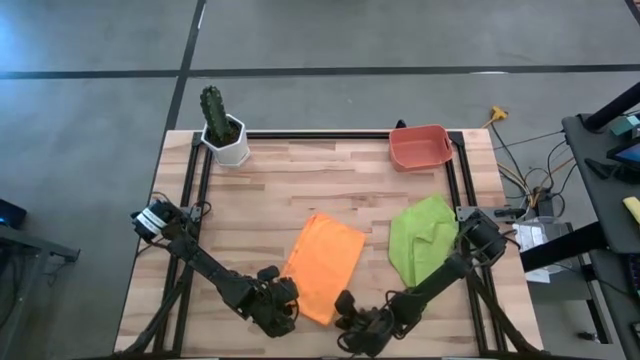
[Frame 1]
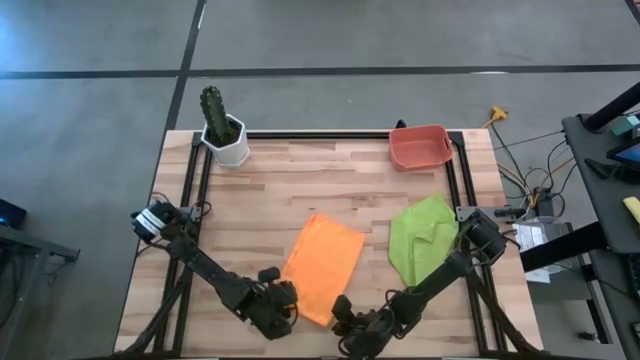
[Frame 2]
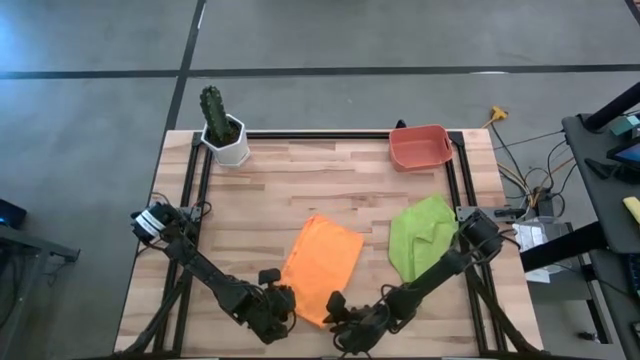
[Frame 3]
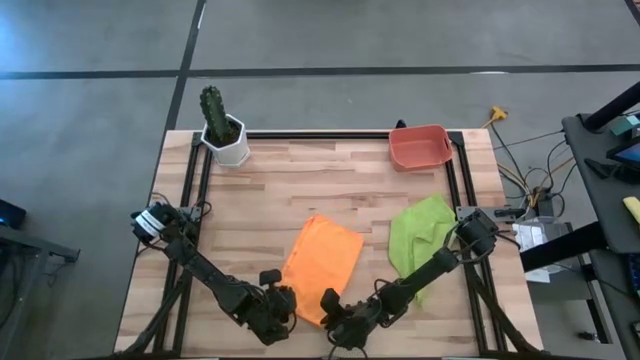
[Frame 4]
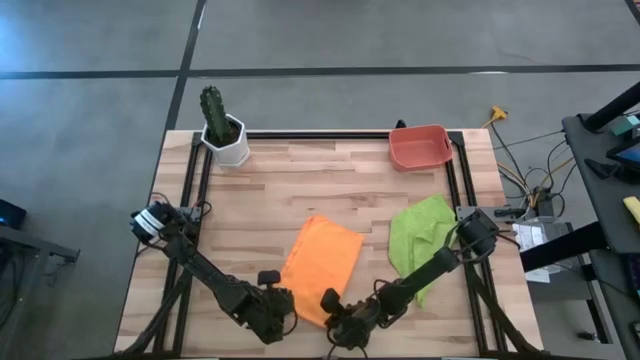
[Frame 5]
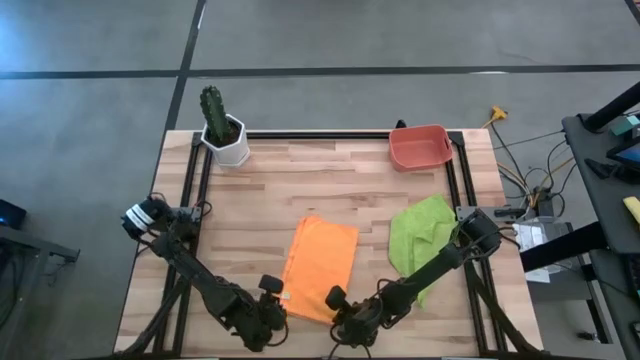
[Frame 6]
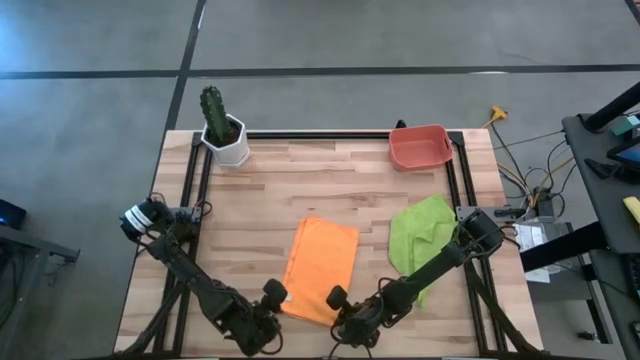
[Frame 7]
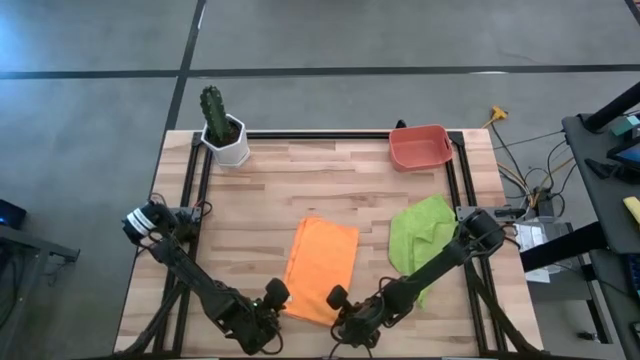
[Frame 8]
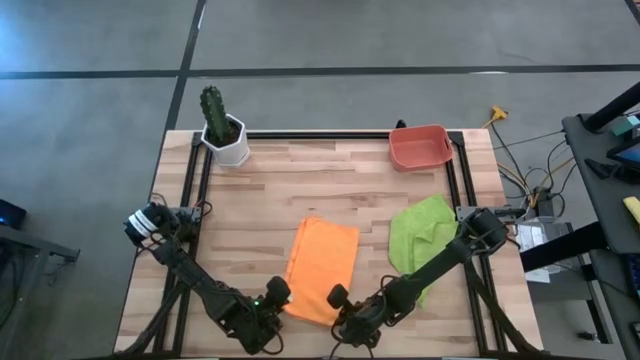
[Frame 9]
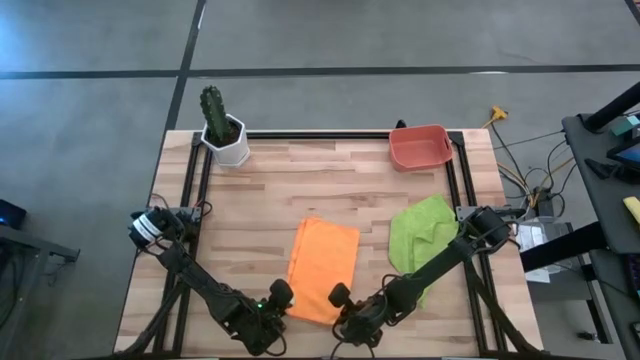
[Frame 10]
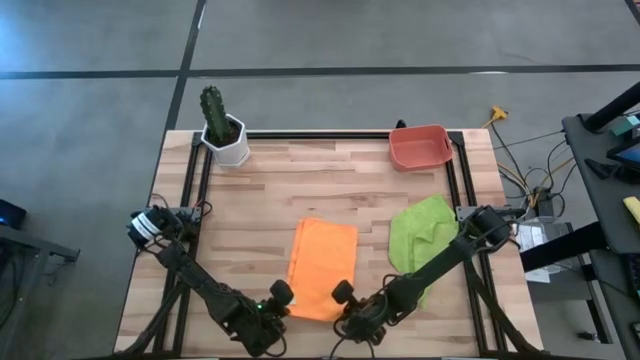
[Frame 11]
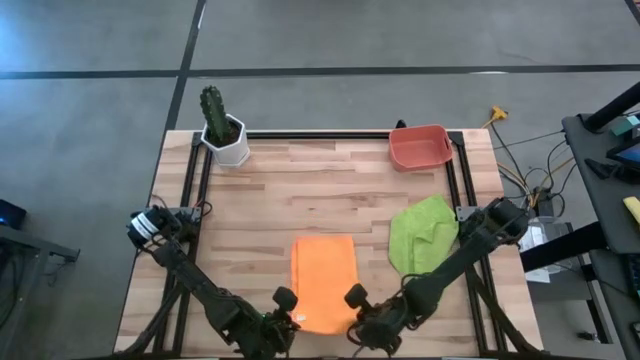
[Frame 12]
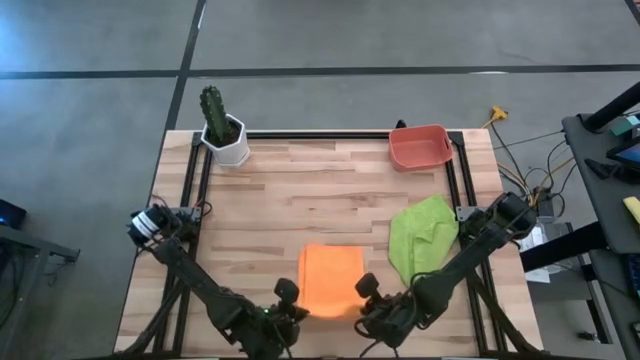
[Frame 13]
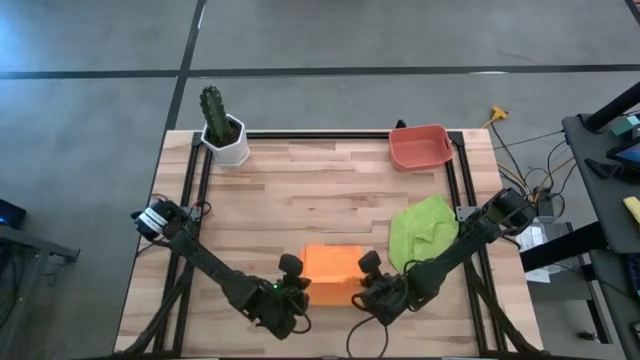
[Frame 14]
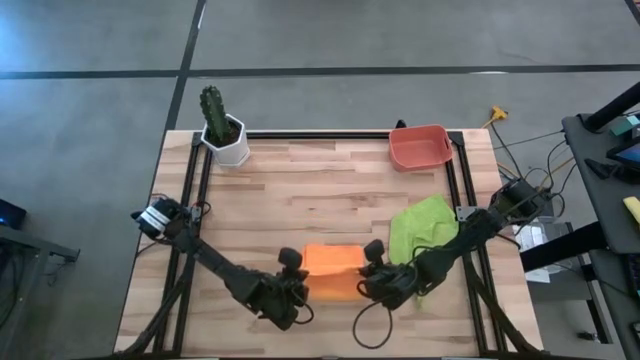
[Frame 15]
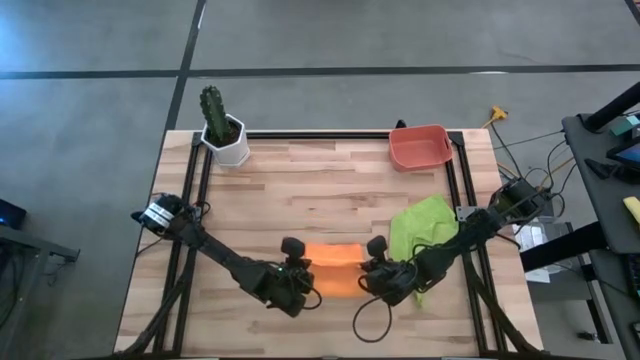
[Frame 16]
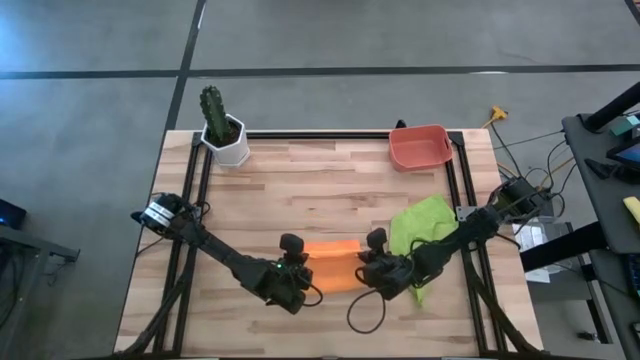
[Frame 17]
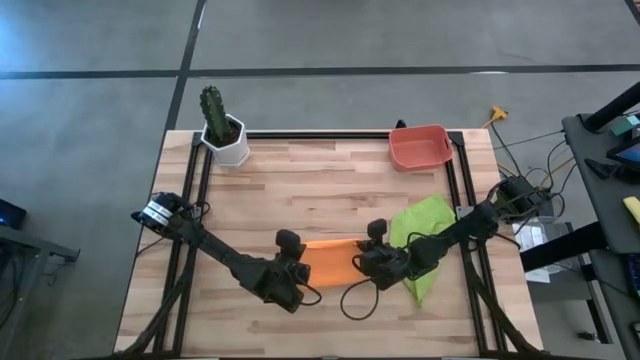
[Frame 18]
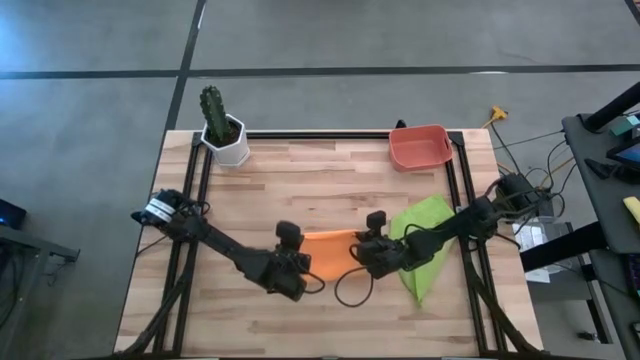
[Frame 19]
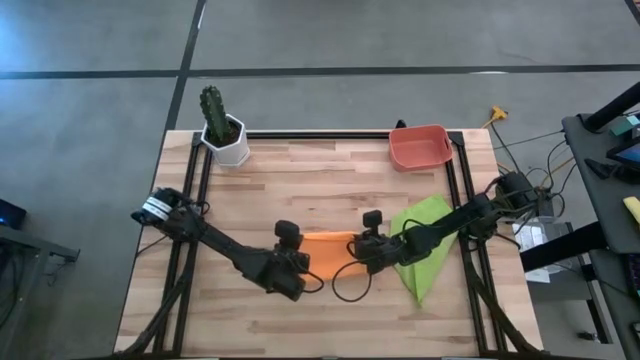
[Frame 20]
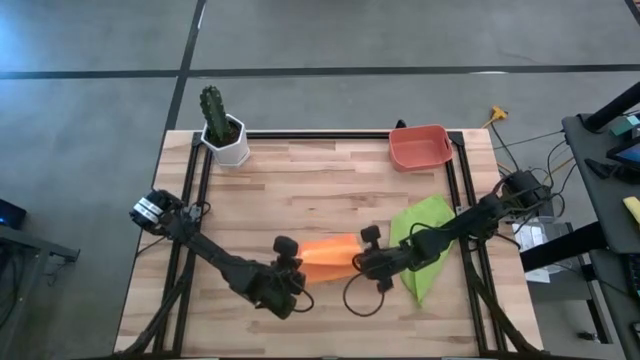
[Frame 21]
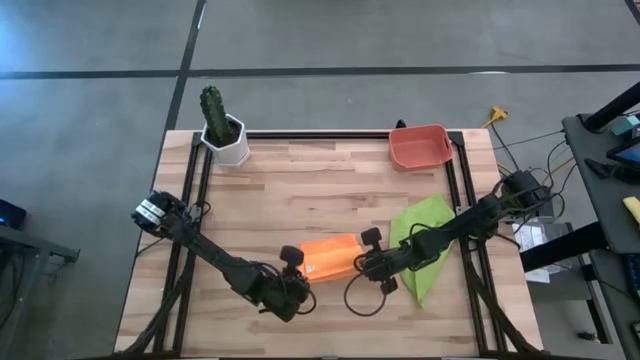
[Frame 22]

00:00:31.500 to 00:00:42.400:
Task: Roll microfiber towels into tight, uniform cylinder then place into a basket
Fold the orange microfiber cloth

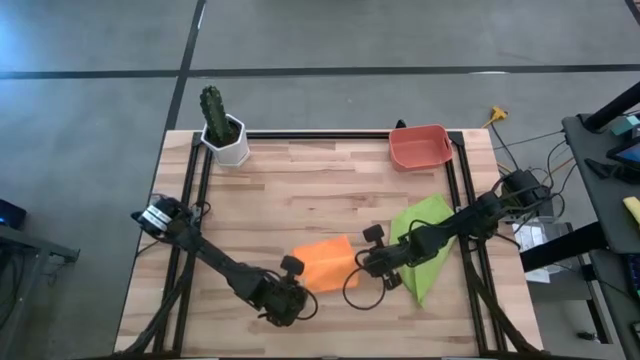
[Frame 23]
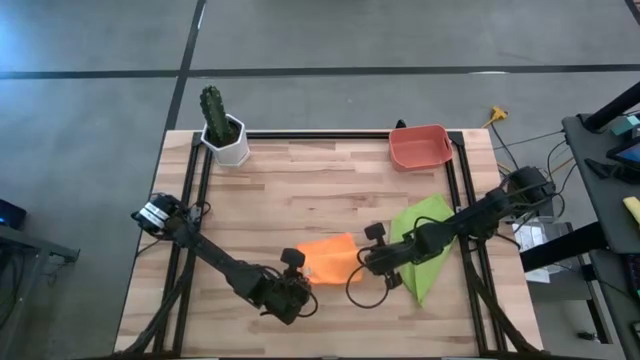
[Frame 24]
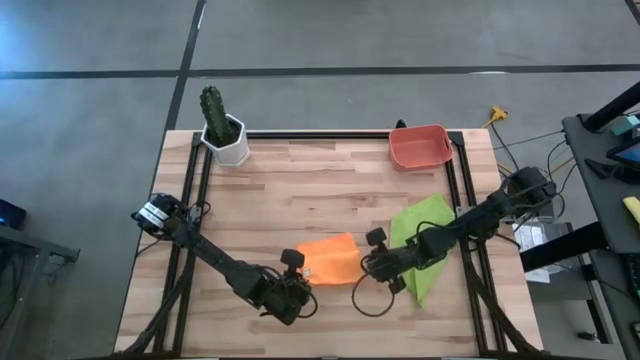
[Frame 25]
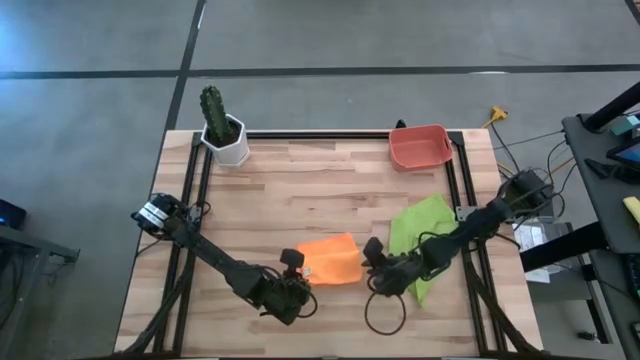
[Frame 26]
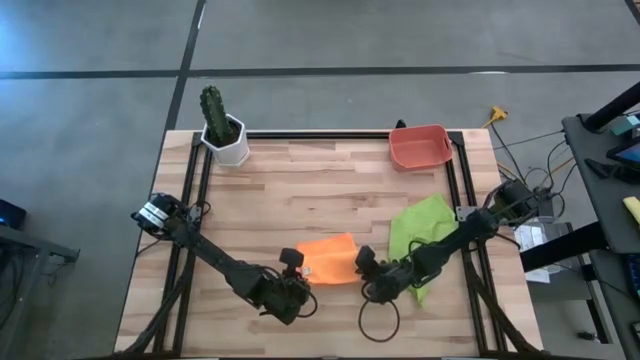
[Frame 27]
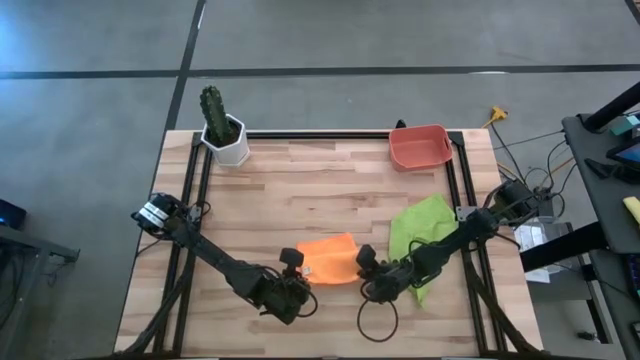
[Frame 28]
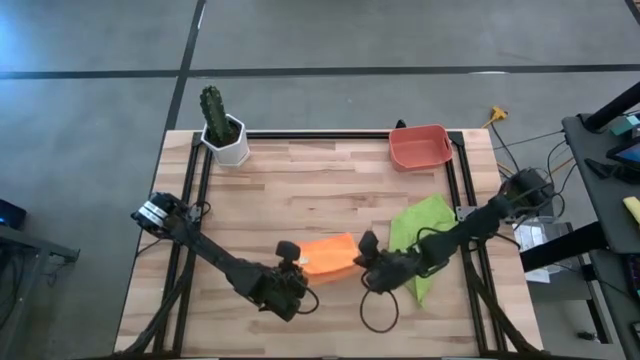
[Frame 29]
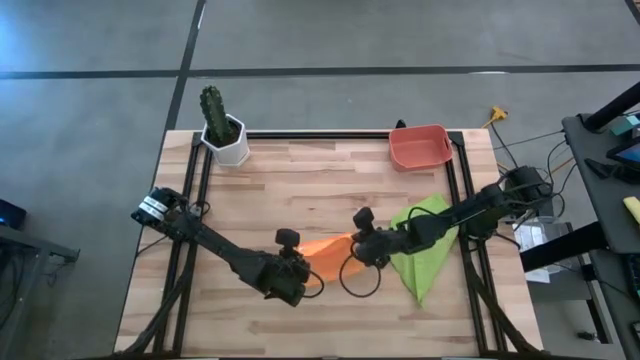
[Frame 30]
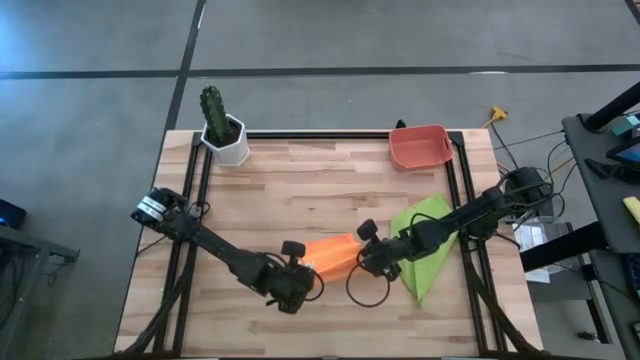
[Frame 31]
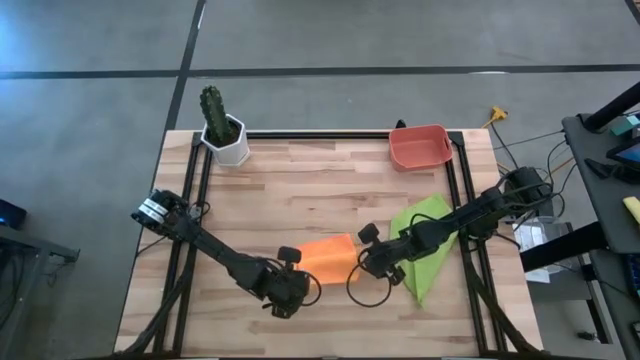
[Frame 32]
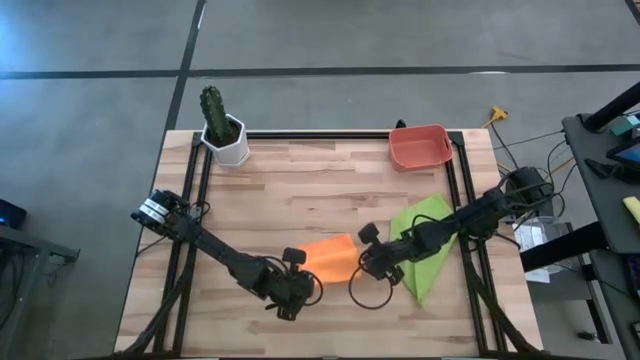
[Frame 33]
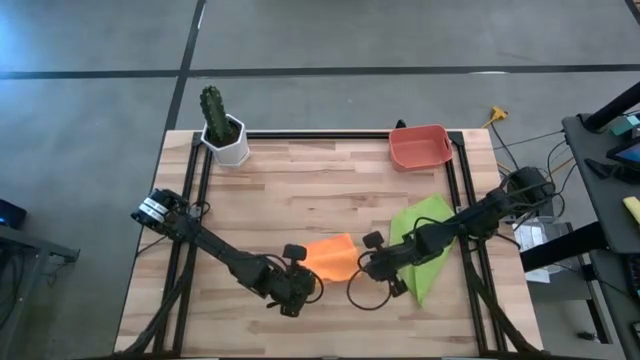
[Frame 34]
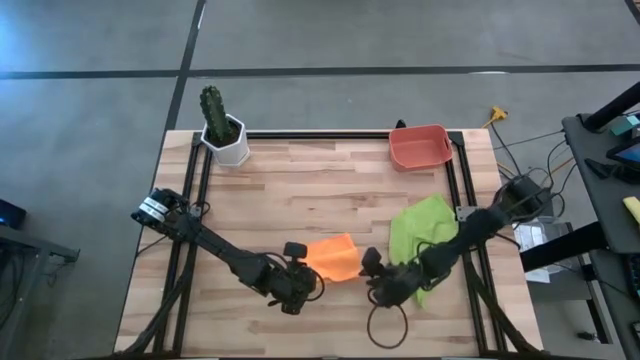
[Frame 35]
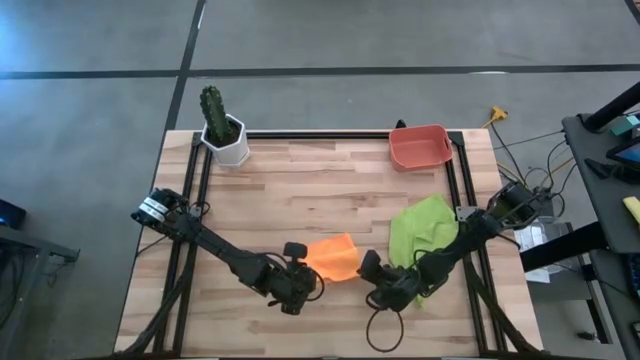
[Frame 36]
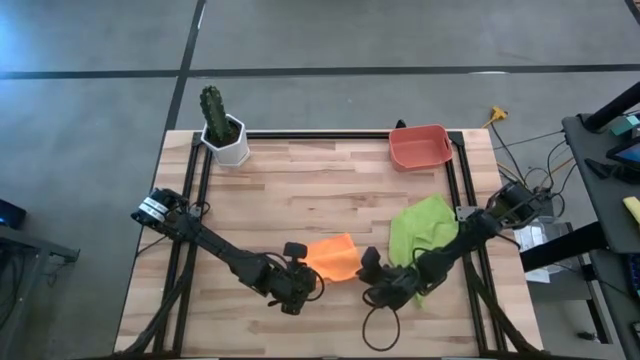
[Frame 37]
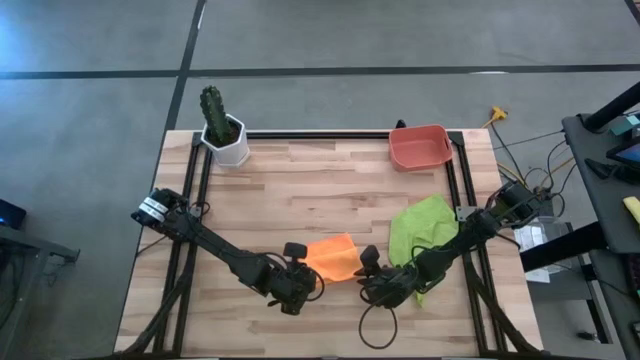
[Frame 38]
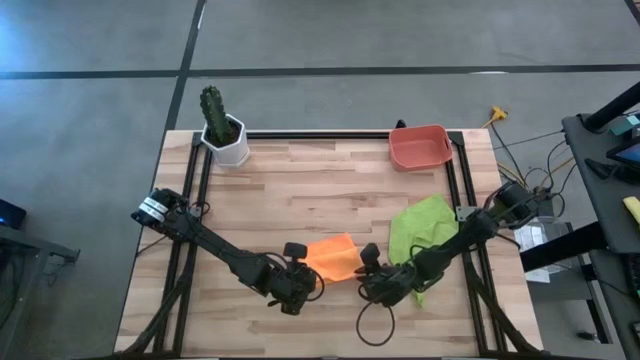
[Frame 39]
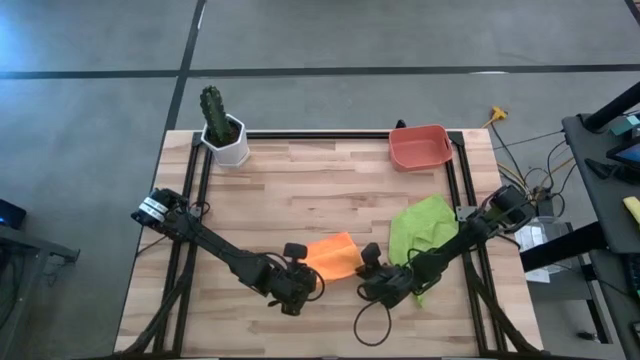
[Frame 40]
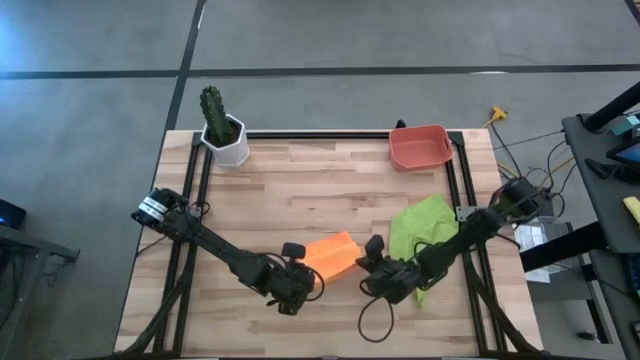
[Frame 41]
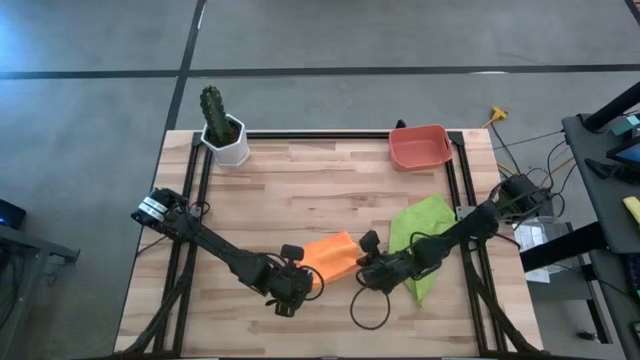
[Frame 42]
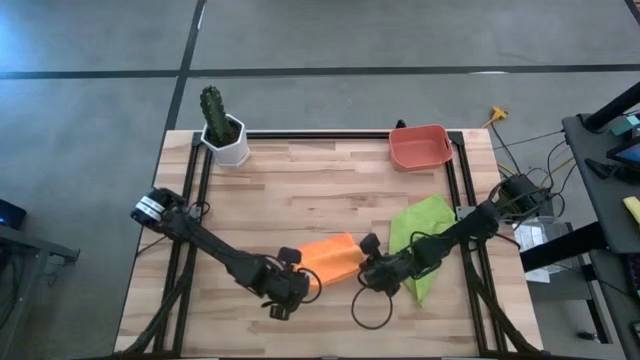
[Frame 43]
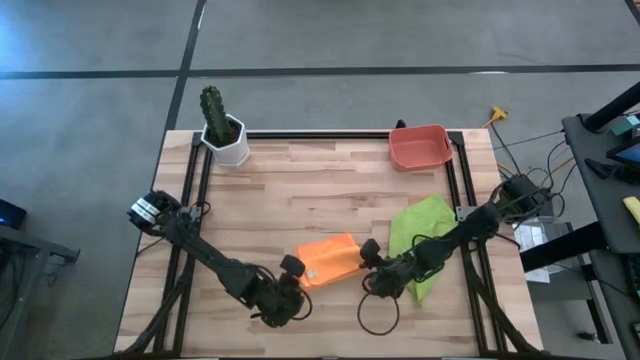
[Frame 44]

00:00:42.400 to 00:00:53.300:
Fold the orange microfiber cloth
